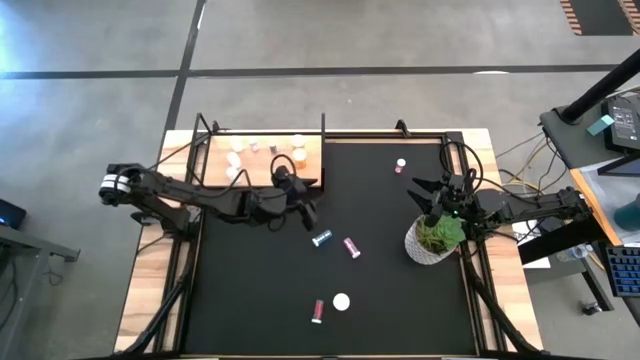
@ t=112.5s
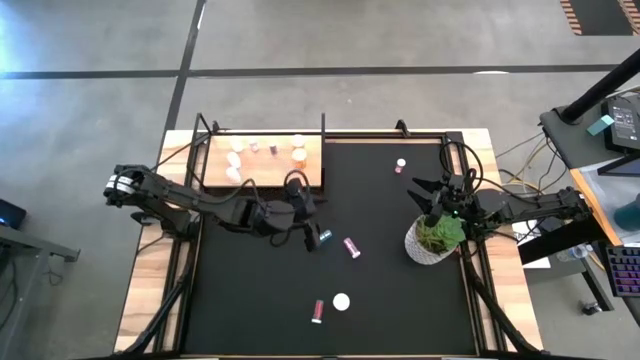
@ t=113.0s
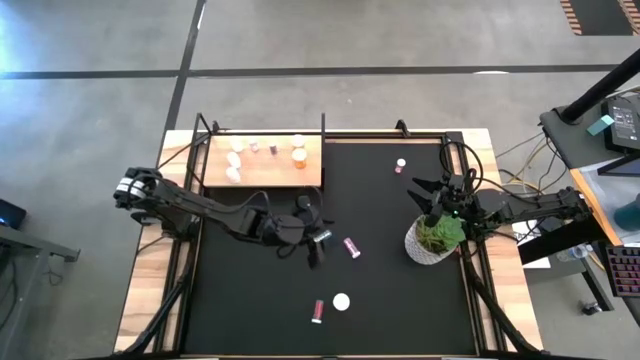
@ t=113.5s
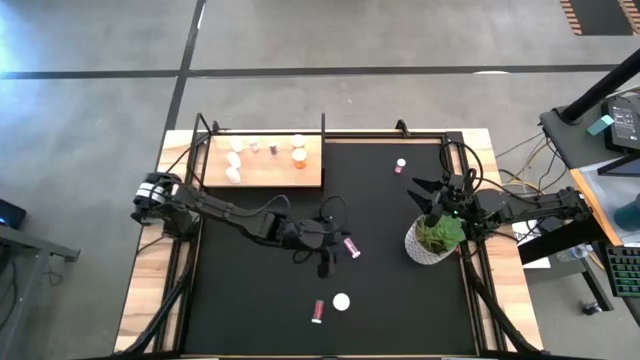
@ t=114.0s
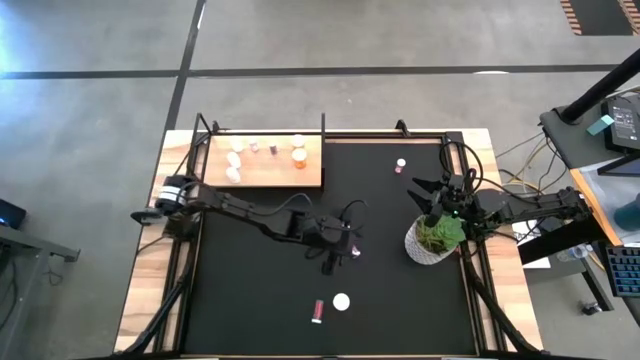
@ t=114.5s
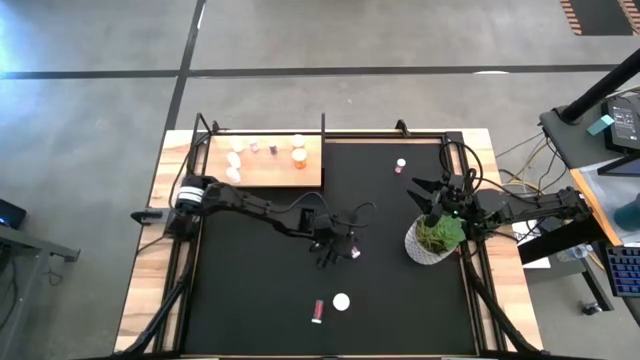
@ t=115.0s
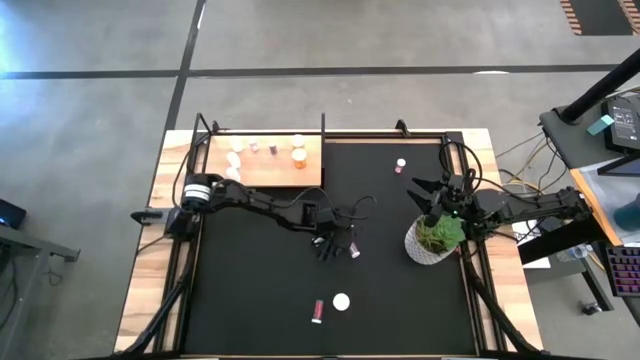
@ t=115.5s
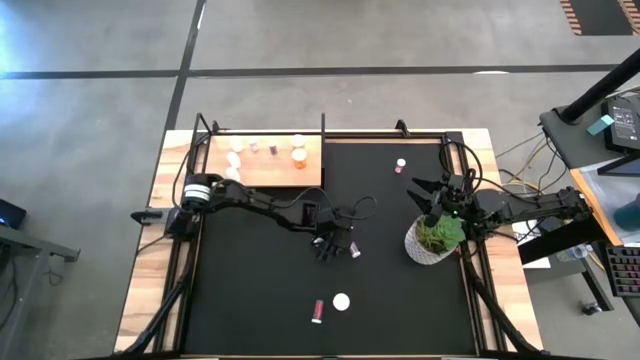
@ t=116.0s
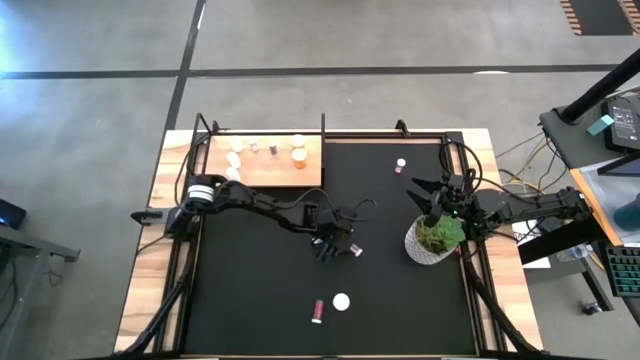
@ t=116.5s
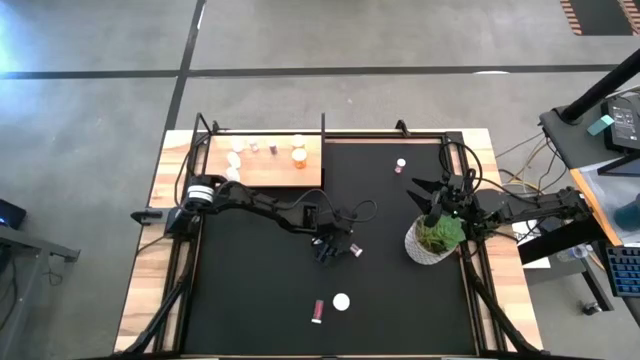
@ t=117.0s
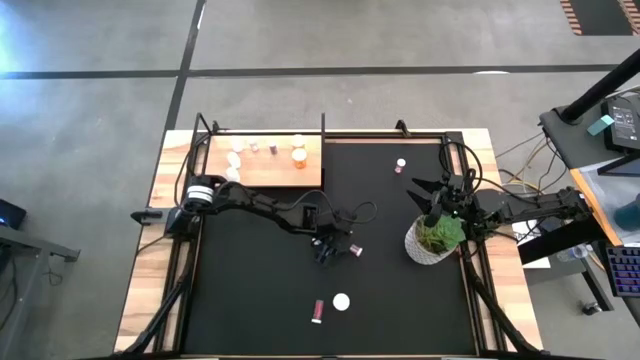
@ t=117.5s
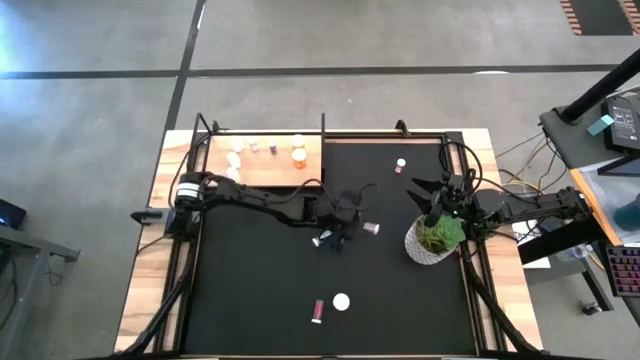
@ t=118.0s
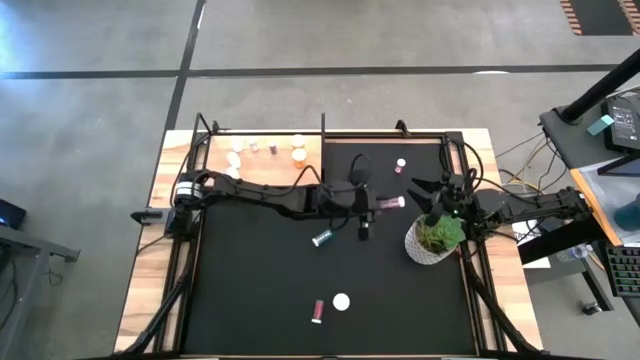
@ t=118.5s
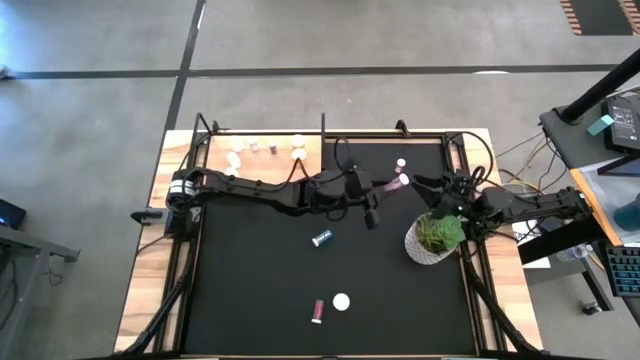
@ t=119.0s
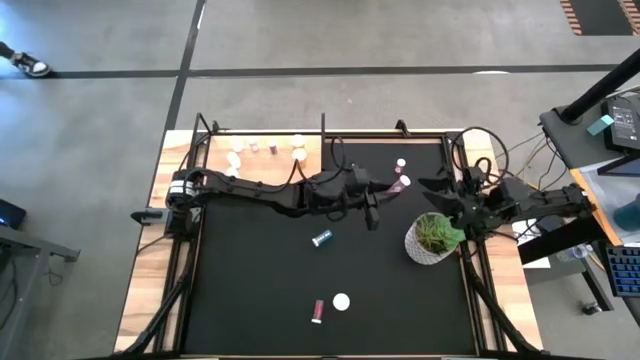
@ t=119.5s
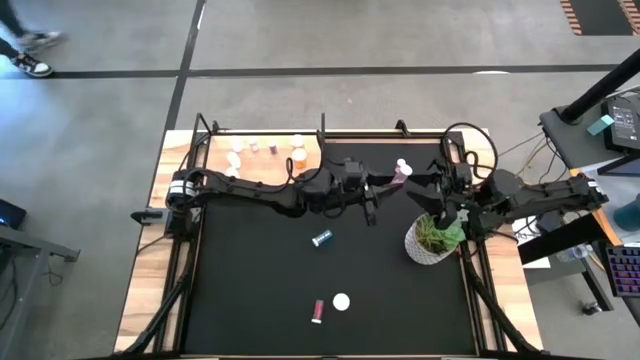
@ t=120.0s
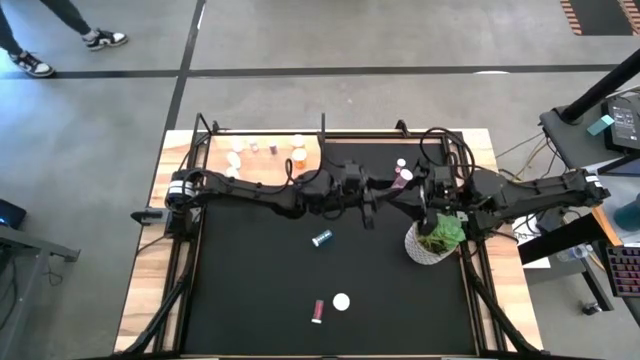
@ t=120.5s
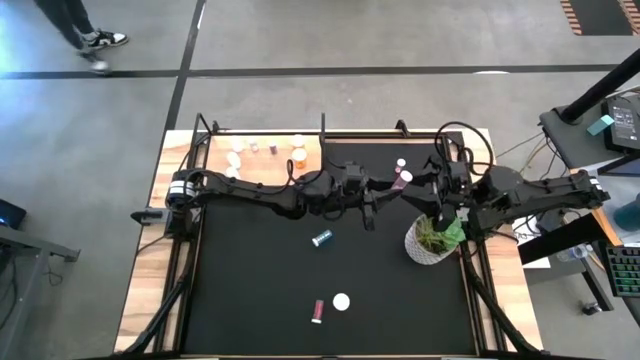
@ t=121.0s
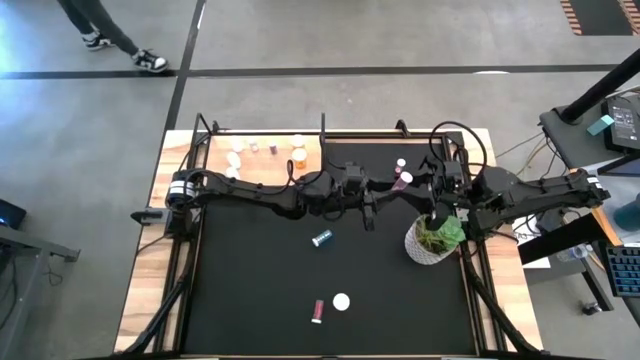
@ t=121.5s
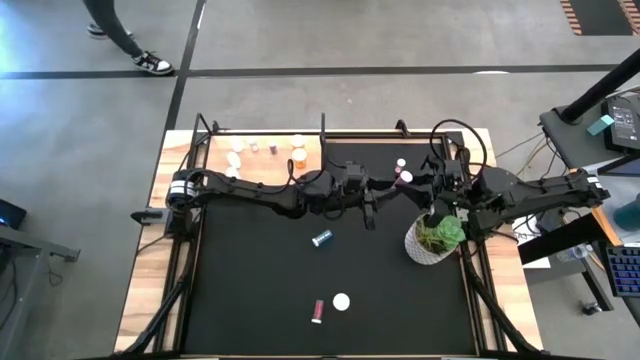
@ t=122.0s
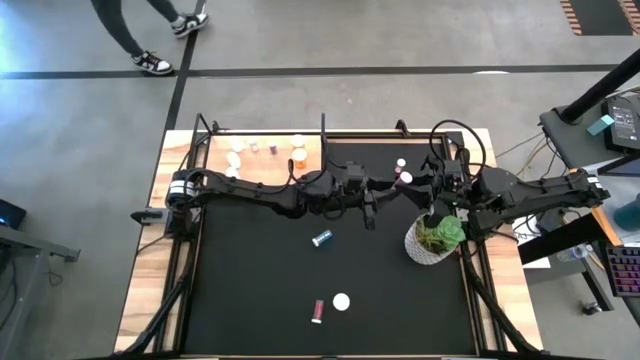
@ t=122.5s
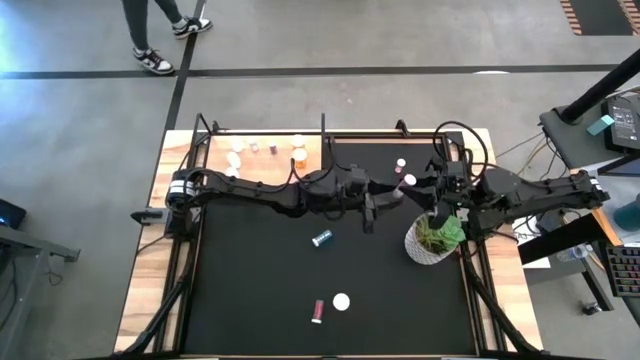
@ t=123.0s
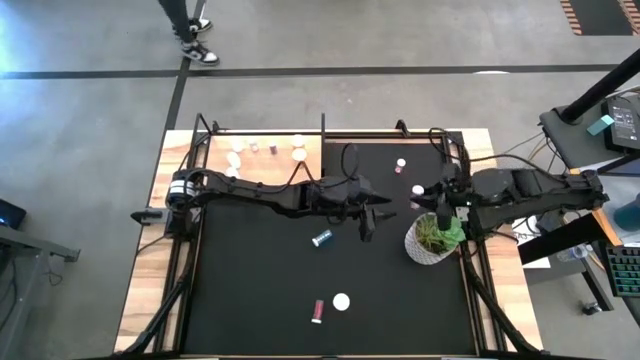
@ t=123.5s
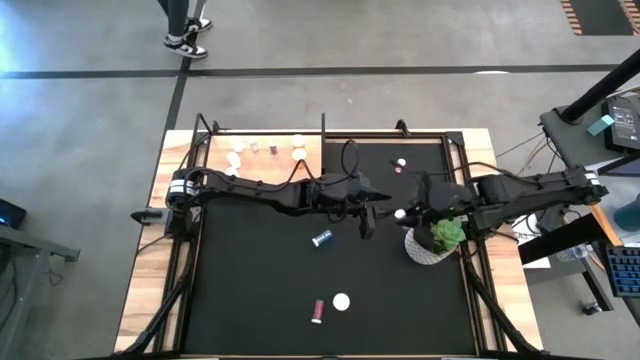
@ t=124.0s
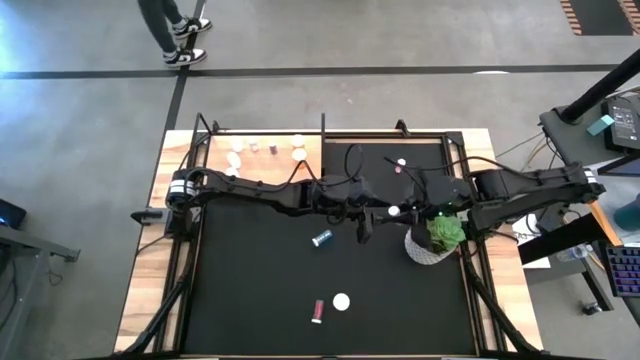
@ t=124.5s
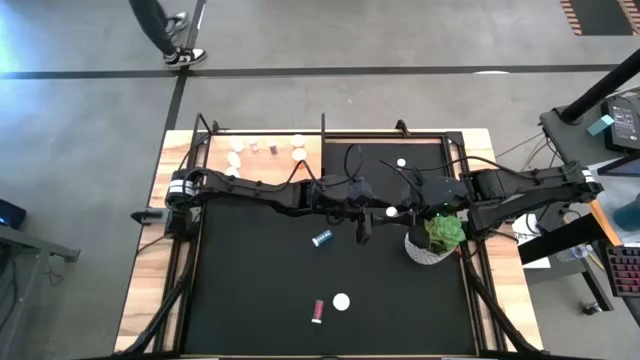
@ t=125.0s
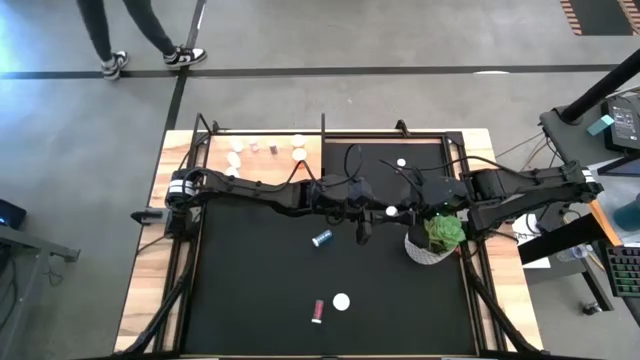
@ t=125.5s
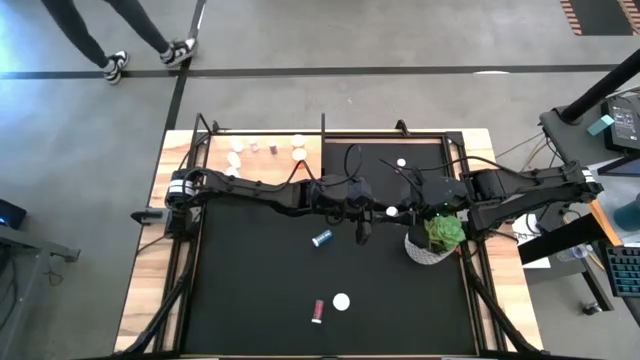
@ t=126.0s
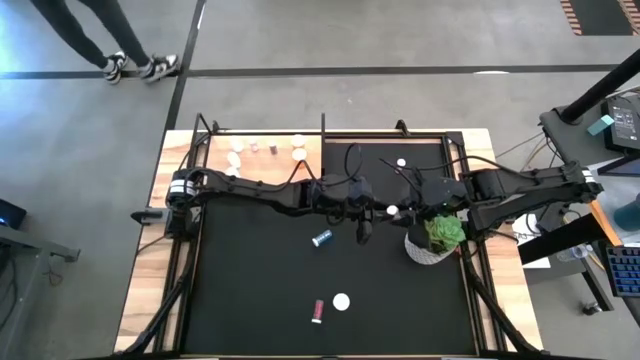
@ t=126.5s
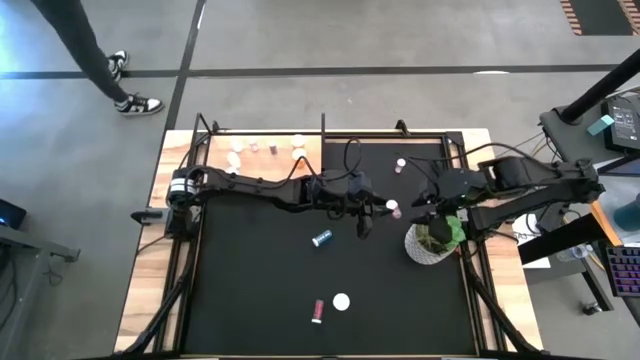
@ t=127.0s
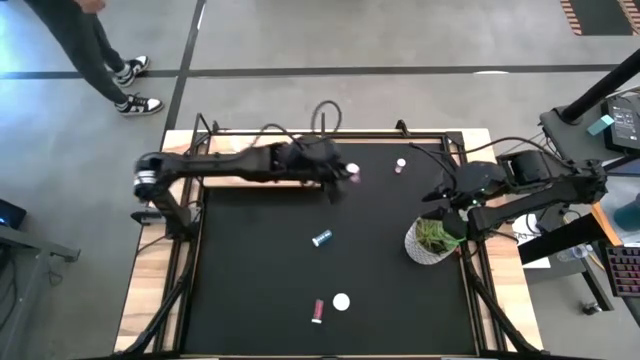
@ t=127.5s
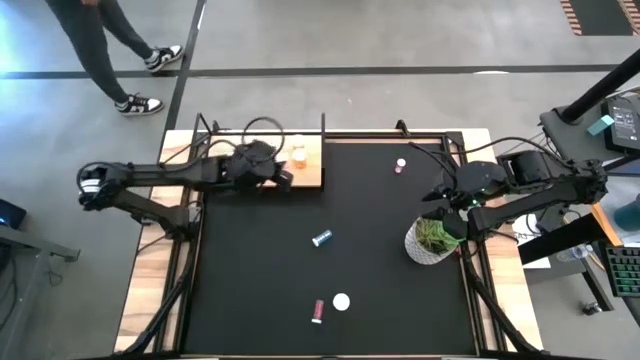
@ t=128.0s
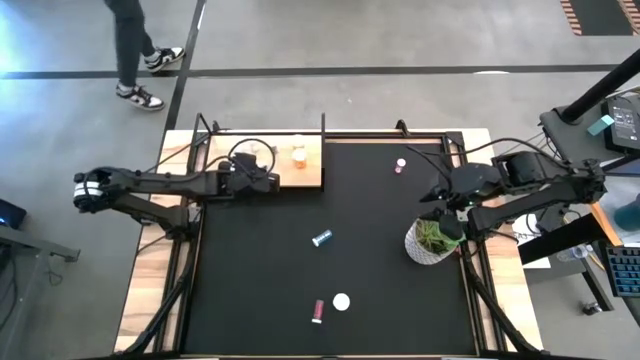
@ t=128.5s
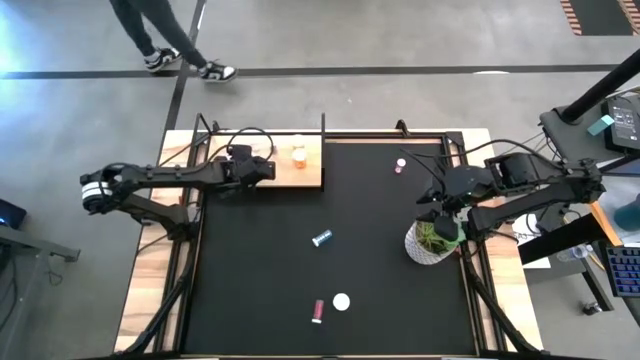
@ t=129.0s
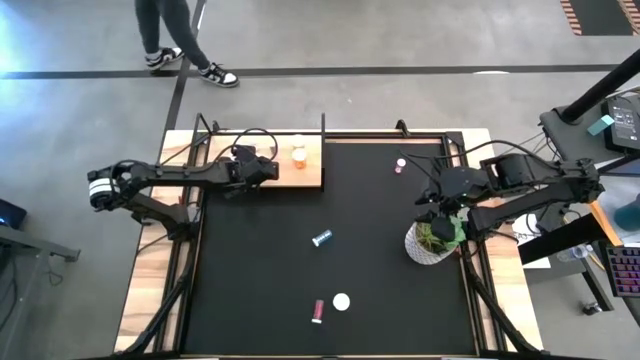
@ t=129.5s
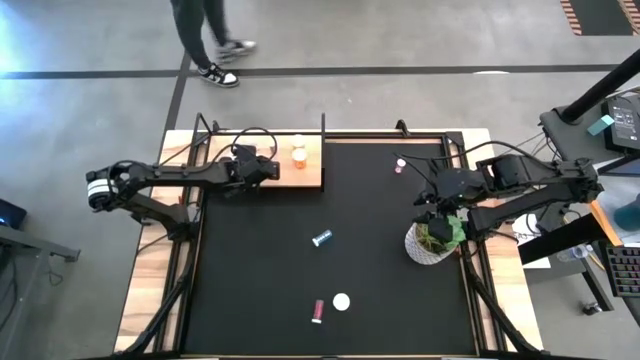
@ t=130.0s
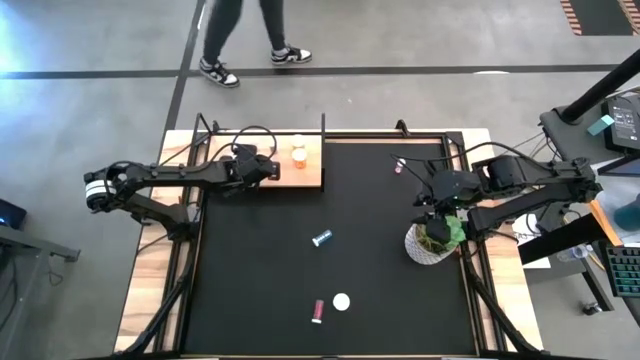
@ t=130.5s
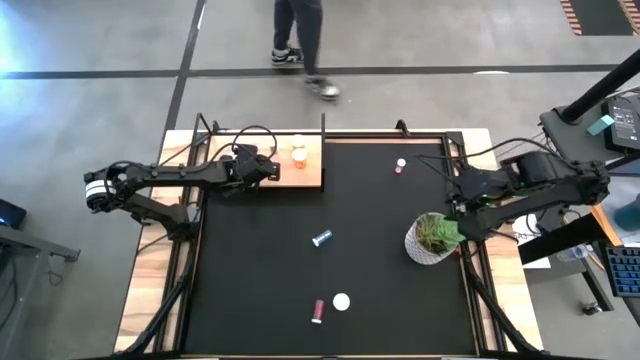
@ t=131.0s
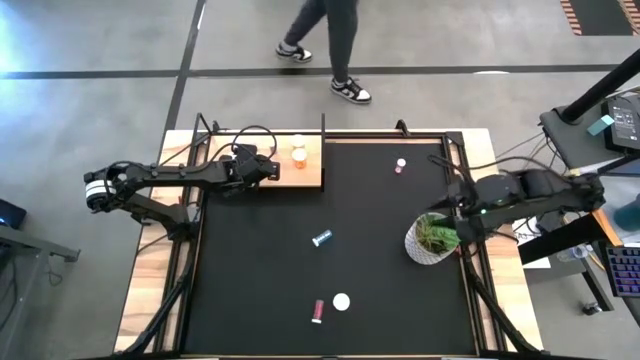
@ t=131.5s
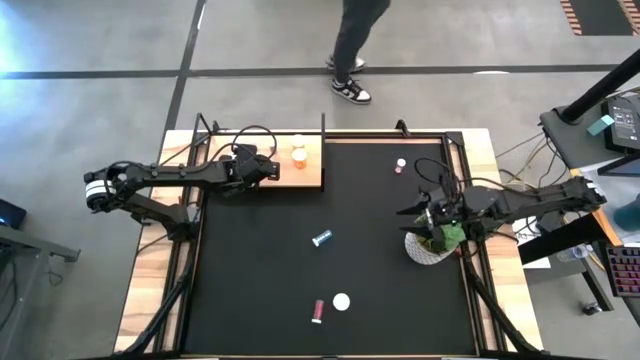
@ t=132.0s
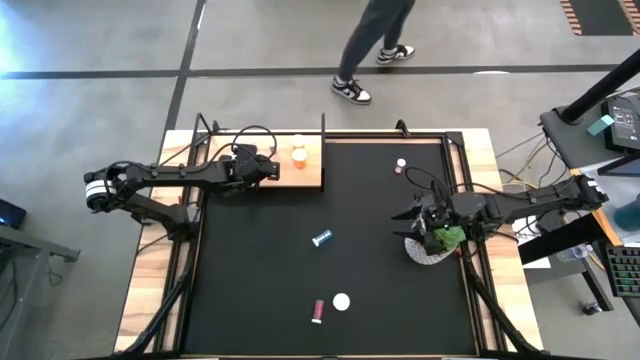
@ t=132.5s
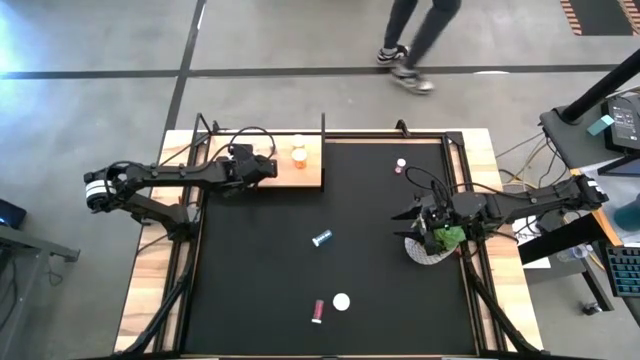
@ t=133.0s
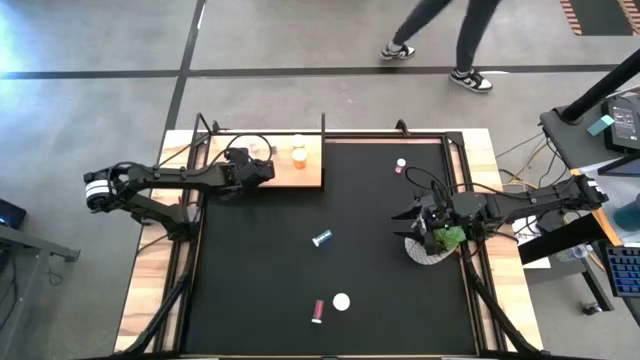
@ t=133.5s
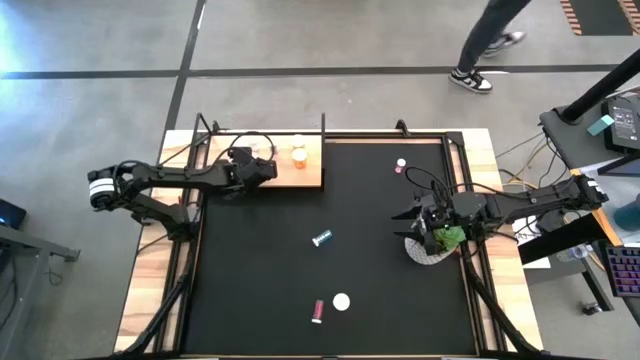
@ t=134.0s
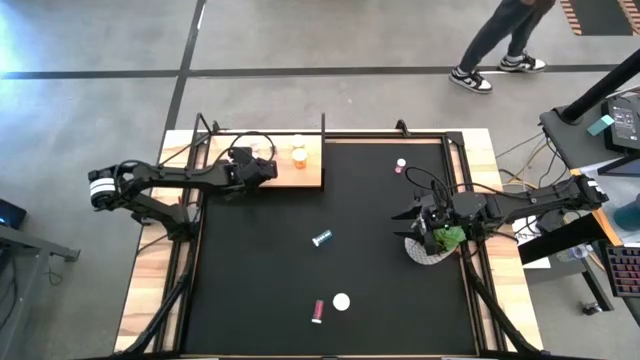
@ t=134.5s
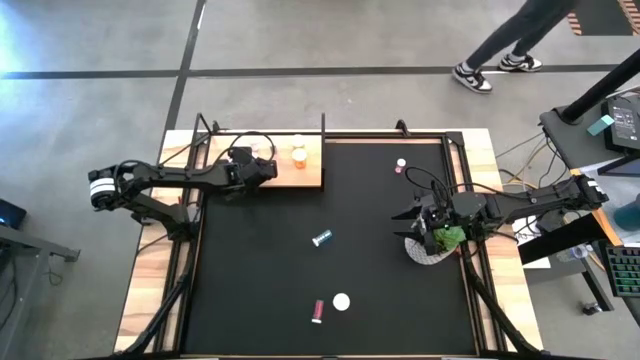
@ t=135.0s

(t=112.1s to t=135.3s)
Task: Pick and place medicine bottles onto shelf by color
Put the bottom pink pill bottle into the shelf
